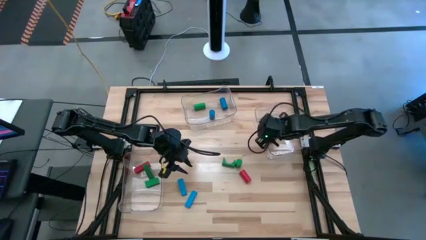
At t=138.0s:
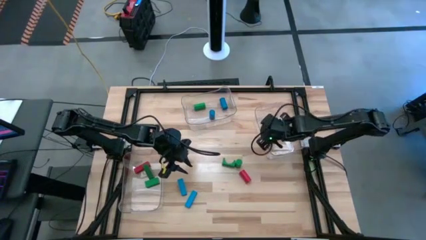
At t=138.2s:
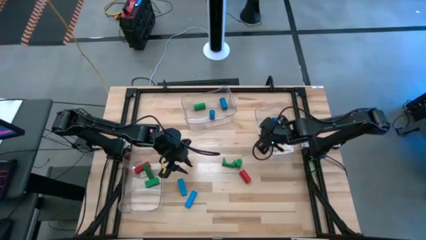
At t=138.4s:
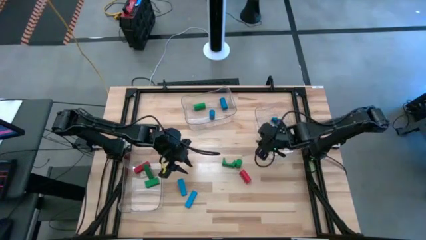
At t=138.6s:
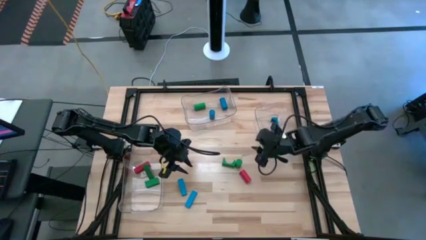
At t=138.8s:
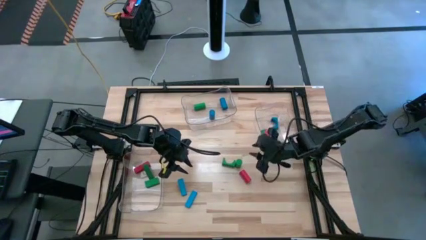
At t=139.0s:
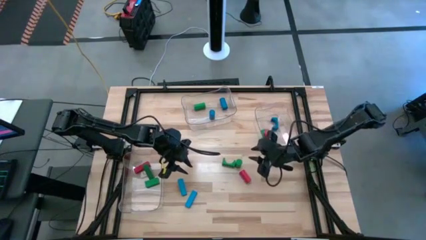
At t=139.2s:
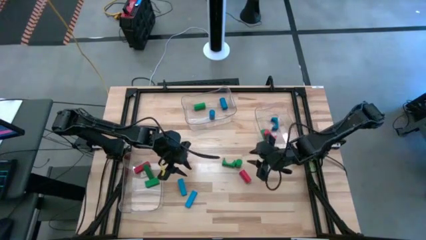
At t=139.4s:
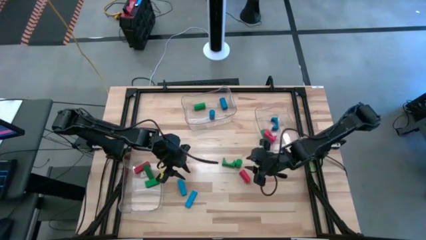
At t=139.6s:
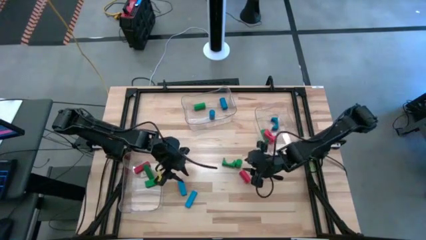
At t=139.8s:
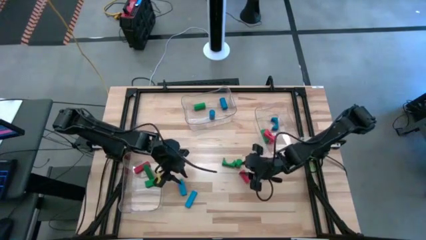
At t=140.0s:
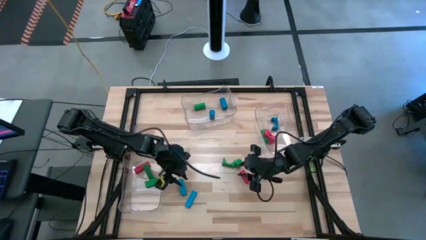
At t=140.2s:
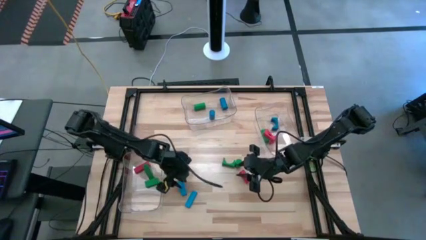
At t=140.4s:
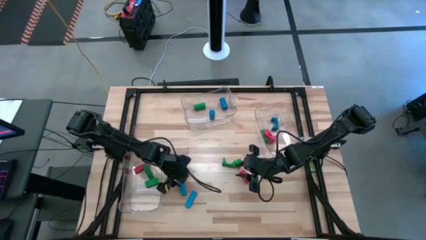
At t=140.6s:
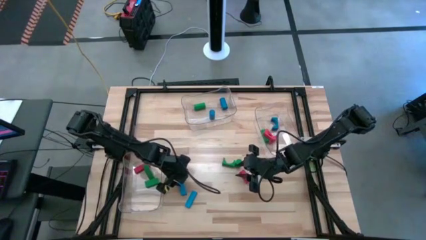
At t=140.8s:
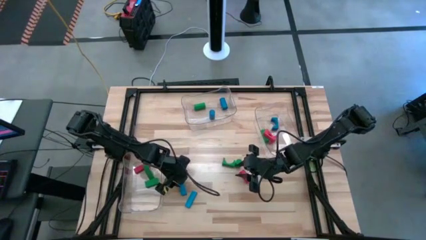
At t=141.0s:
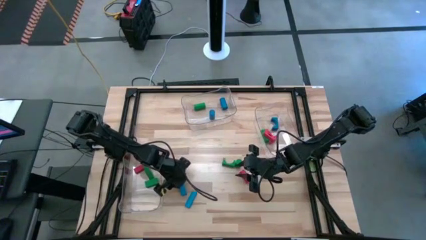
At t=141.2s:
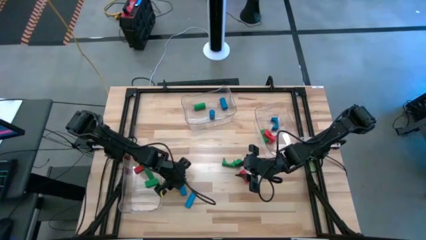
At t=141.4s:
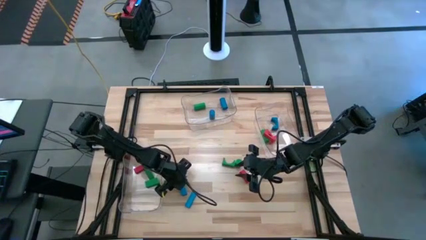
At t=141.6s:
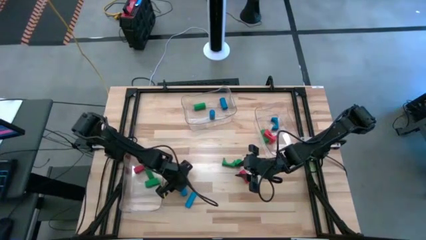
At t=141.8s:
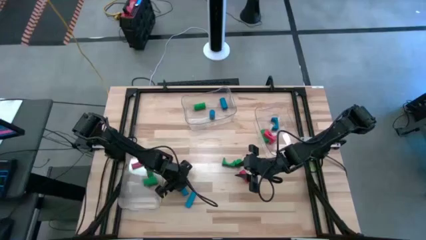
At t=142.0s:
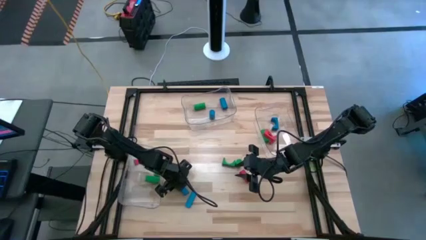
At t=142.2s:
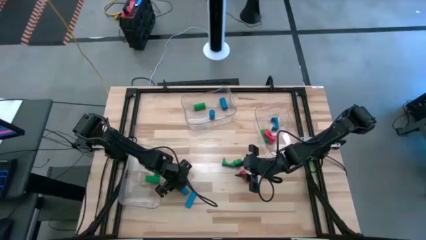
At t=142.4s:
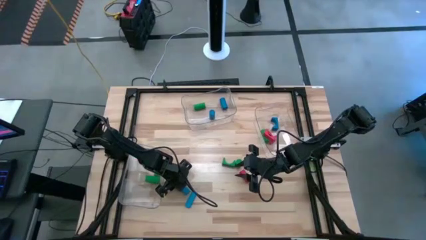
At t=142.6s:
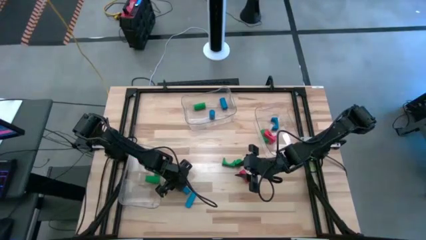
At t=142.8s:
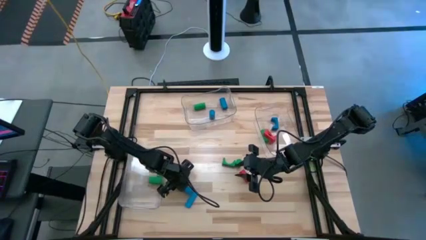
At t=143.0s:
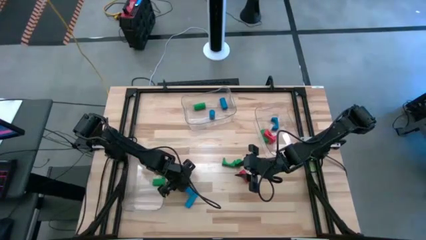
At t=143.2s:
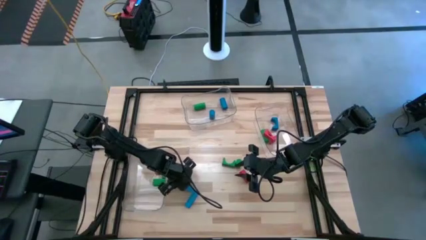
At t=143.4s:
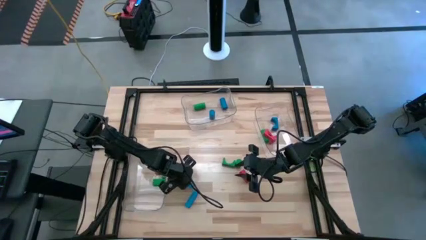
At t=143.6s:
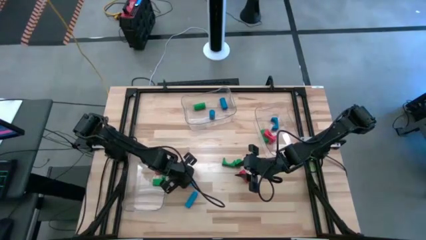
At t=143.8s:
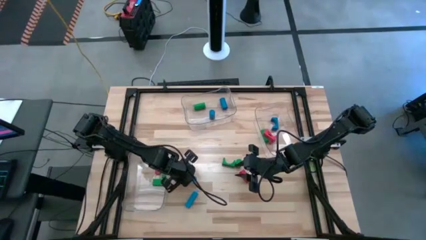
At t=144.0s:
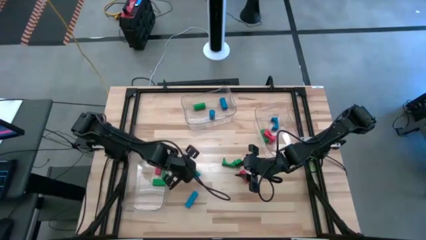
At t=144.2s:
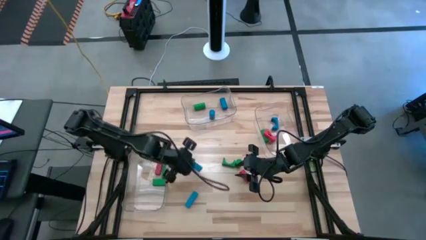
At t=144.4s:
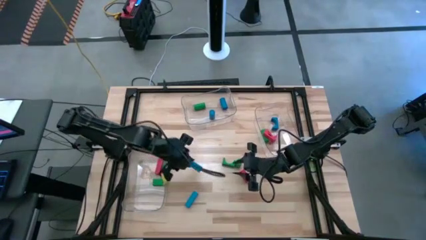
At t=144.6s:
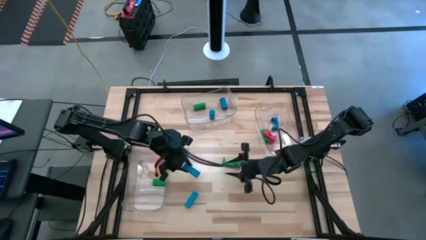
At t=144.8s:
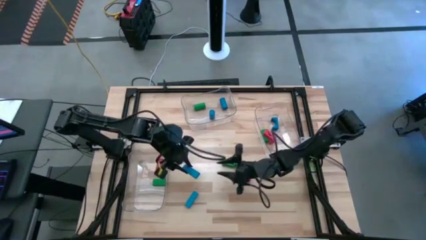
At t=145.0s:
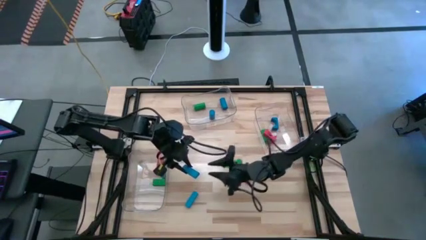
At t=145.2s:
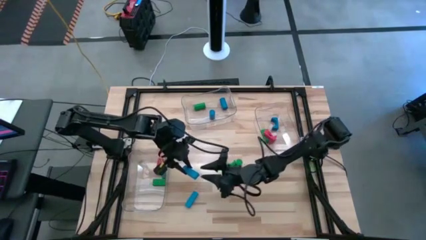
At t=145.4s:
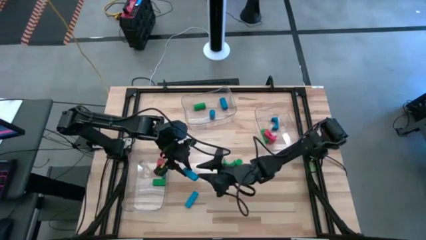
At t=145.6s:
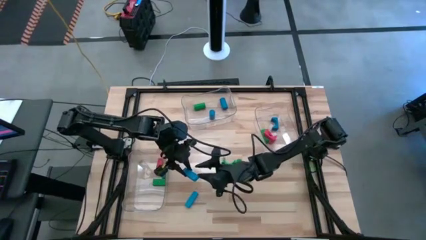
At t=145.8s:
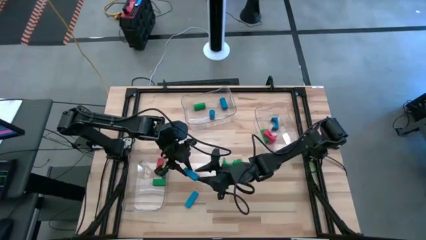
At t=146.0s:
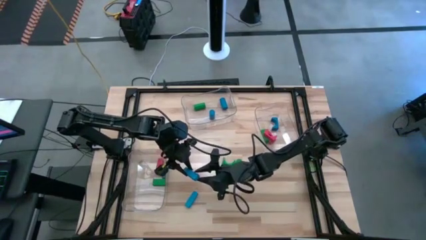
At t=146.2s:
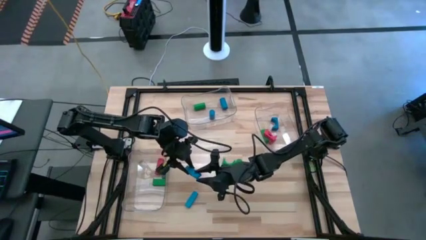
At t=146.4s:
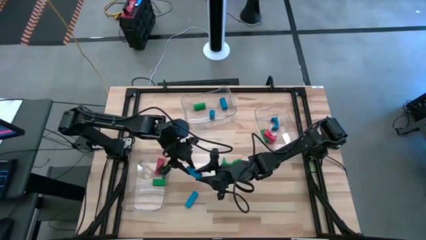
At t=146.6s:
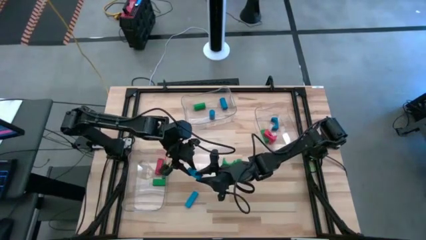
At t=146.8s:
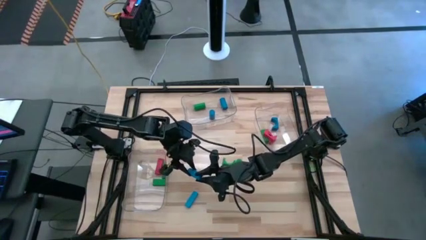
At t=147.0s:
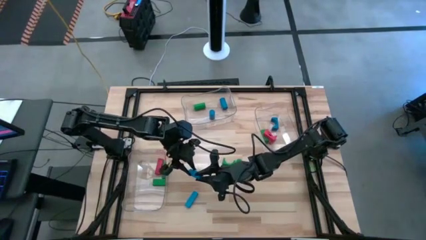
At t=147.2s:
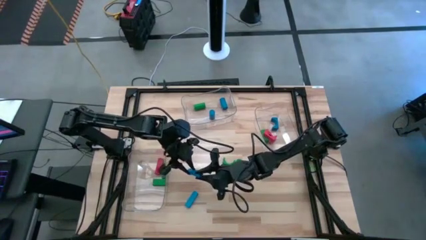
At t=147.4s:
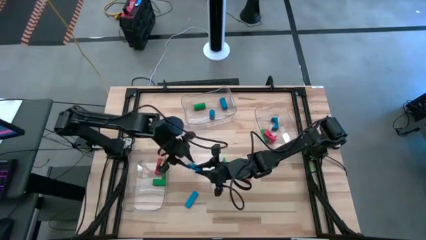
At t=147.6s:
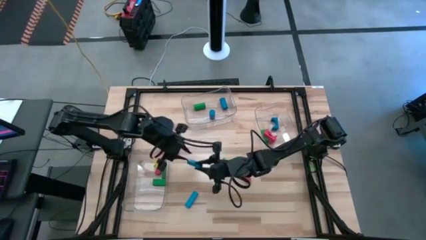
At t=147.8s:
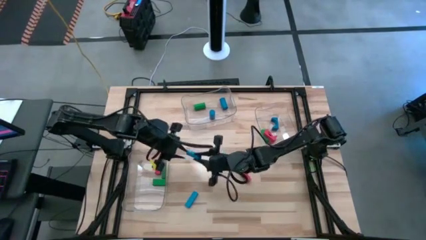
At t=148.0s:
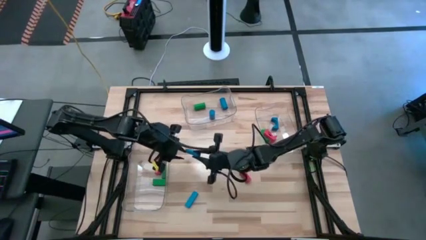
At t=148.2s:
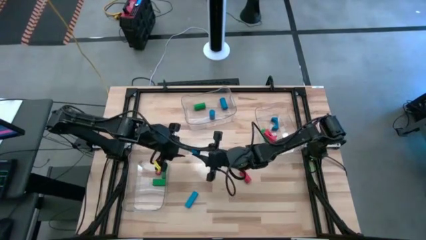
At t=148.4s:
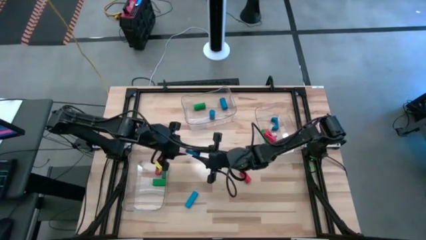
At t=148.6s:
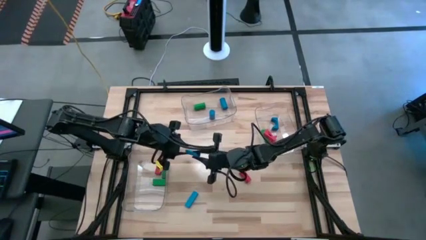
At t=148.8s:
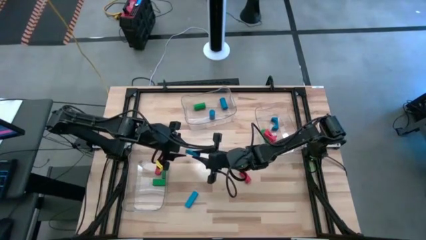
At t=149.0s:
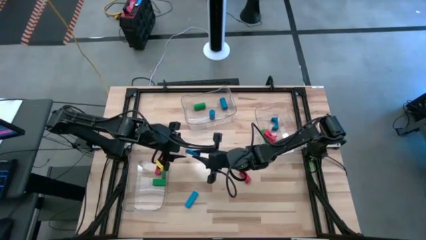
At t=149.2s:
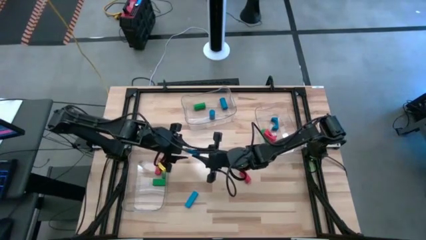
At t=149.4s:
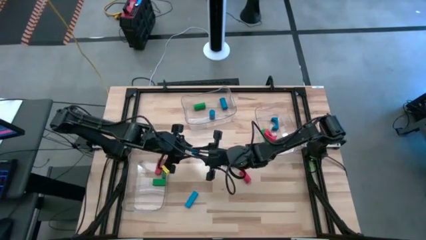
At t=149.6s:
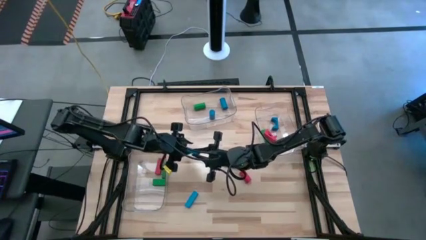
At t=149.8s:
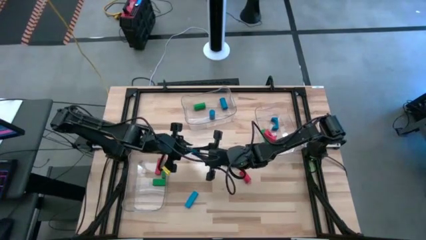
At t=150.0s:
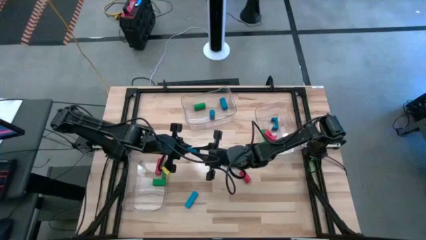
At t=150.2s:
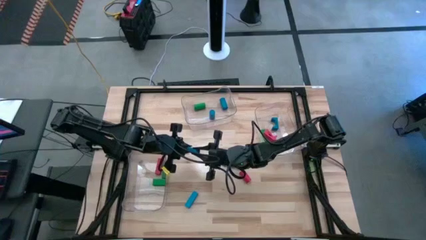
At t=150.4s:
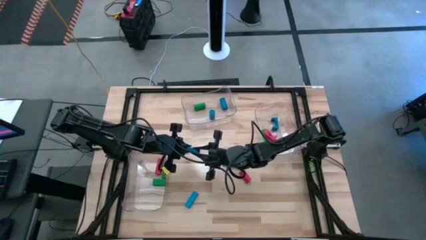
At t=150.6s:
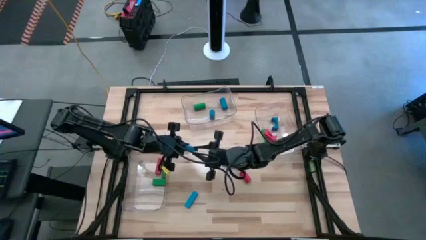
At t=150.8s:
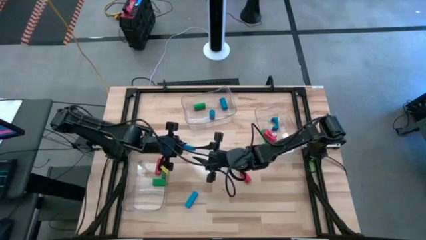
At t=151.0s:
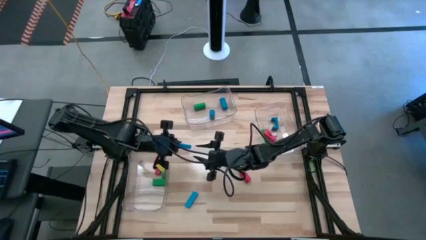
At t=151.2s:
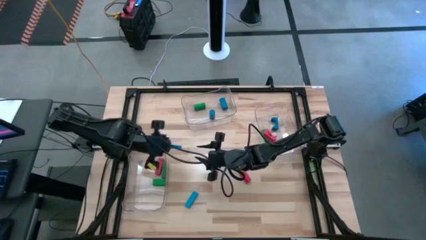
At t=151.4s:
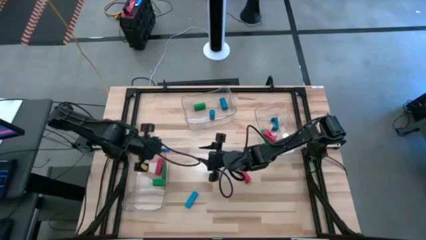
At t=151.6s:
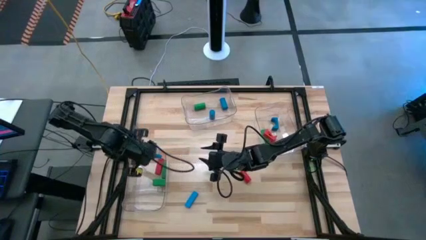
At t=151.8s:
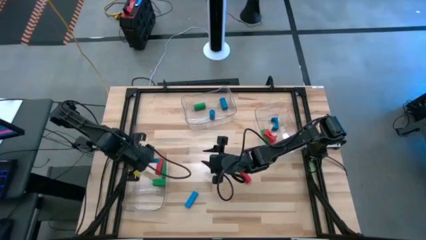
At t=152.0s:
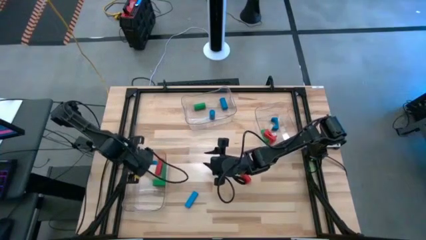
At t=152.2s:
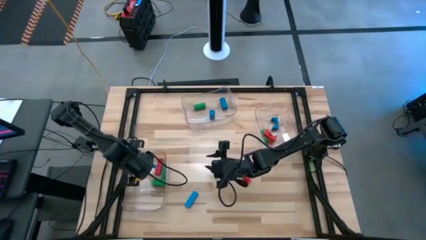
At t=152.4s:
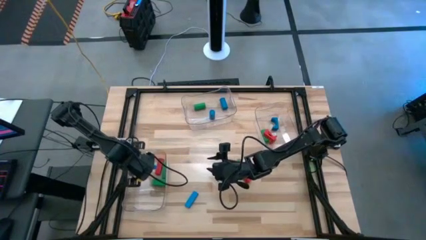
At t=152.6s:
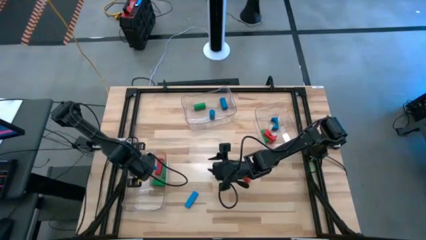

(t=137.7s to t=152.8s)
Task: Sort blocks by size
Put the left blue rectangle block into the left transparent bin
